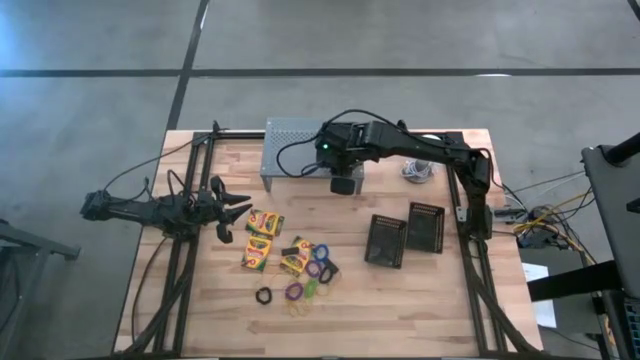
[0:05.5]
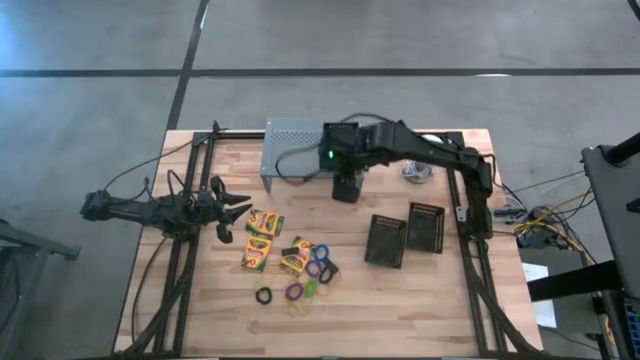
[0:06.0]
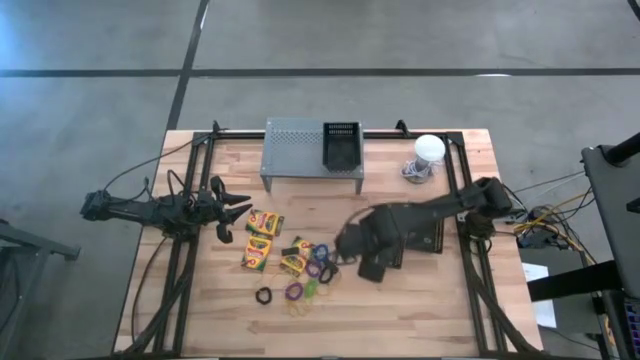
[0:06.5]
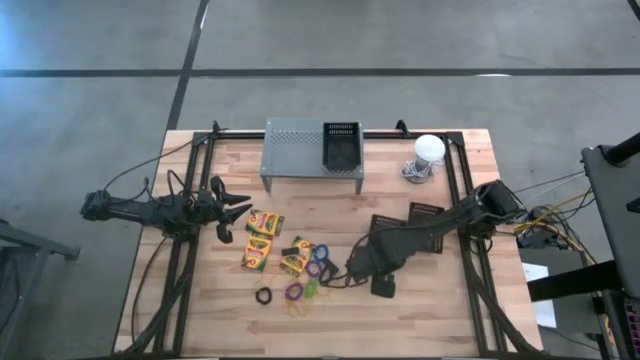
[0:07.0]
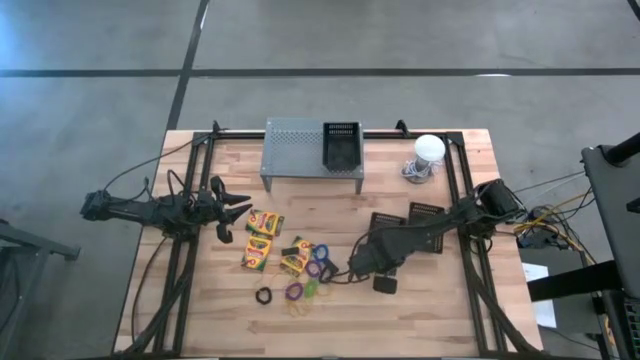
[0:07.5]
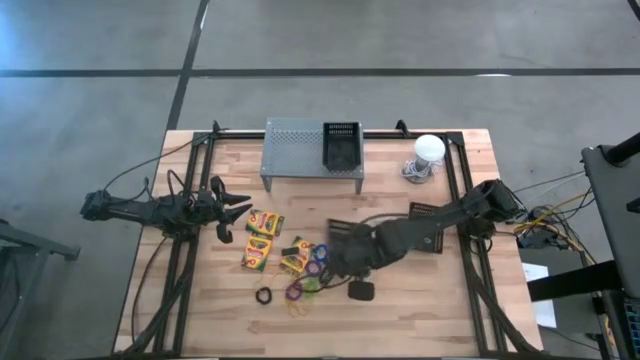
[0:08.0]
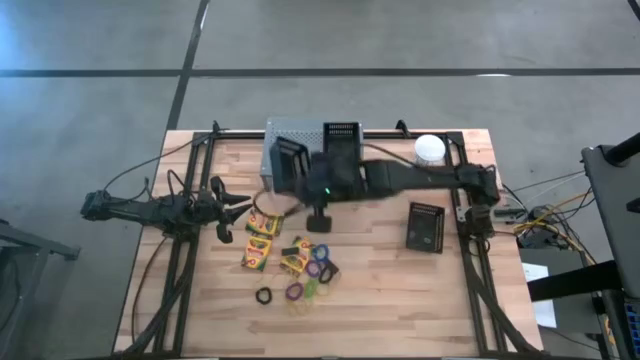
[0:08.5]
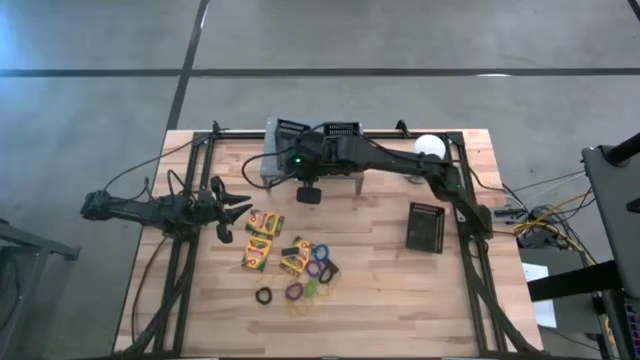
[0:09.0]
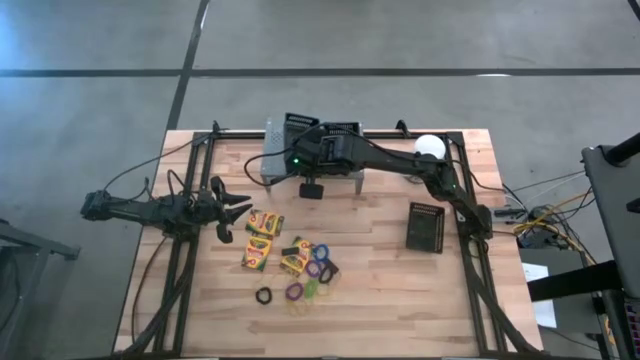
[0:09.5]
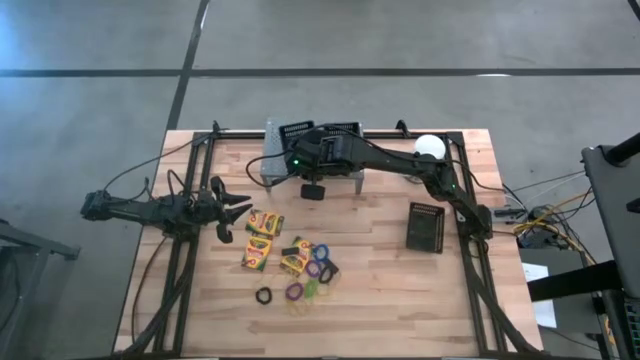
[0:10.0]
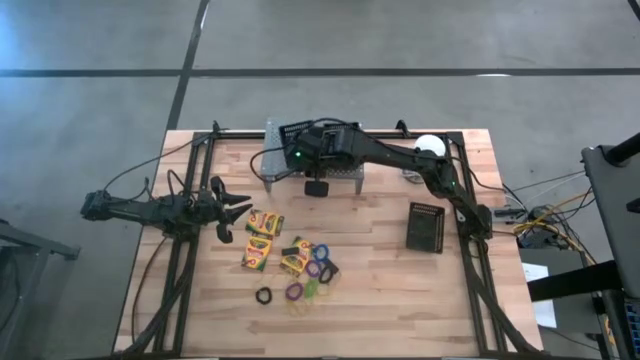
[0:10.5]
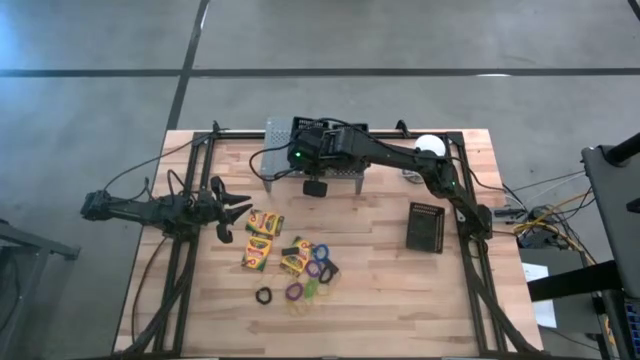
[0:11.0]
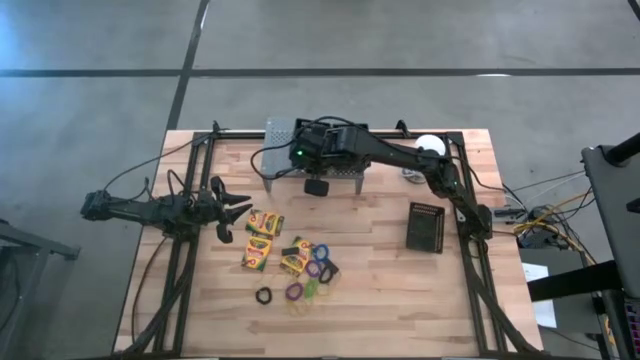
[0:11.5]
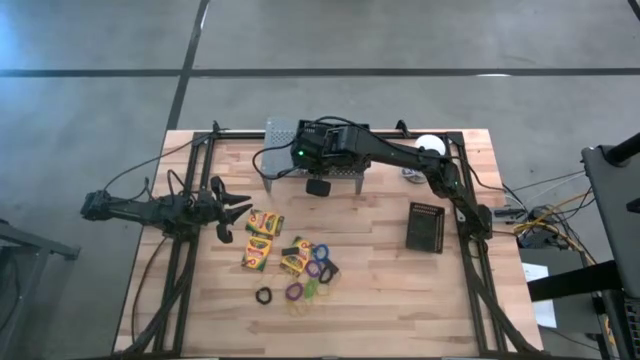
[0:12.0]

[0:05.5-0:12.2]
Task: Pick & Place Office Desk Supplies
Put the left black bin on the shelf

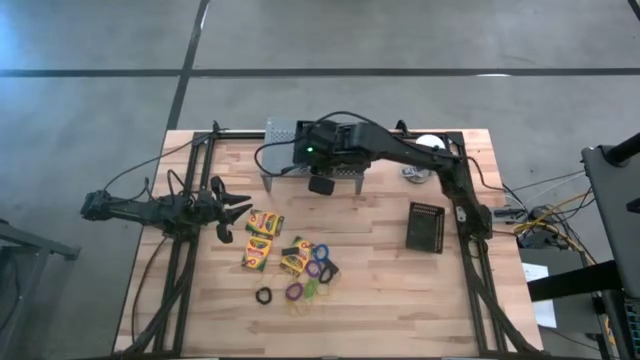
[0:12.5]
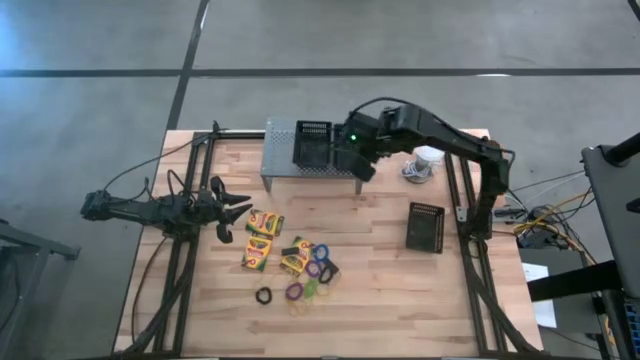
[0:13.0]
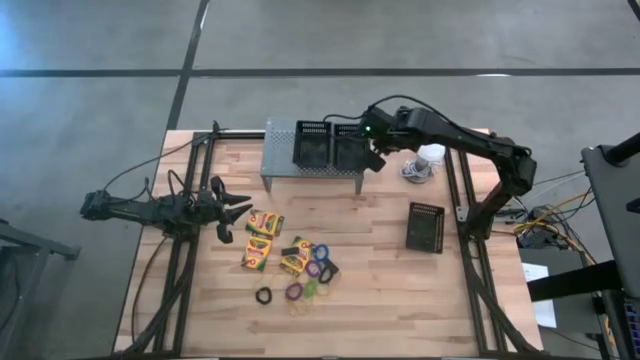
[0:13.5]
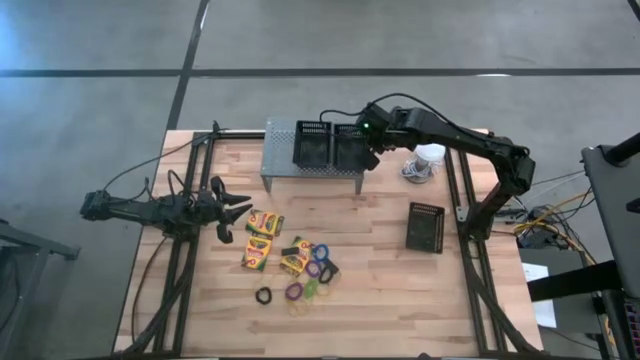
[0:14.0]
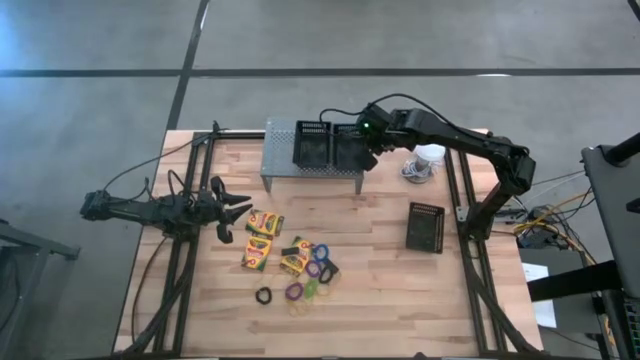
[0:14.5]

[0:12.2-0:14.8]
Adjust the right black bin on the shelf

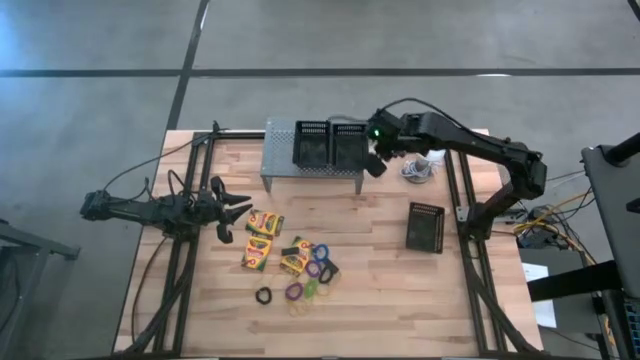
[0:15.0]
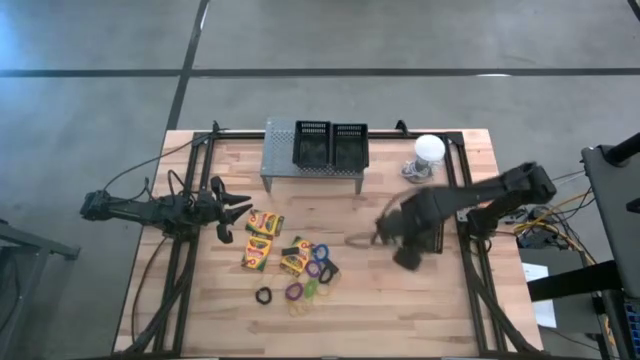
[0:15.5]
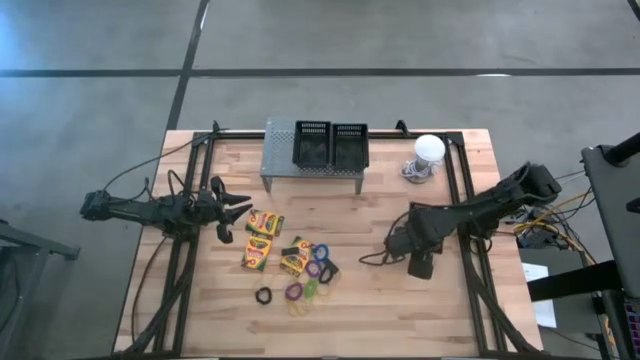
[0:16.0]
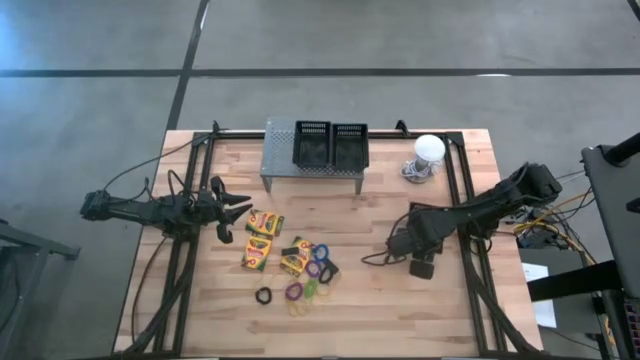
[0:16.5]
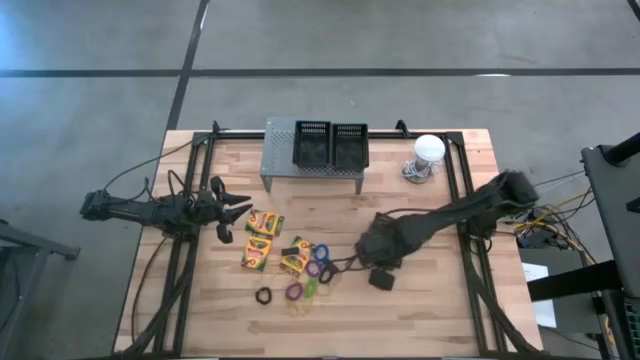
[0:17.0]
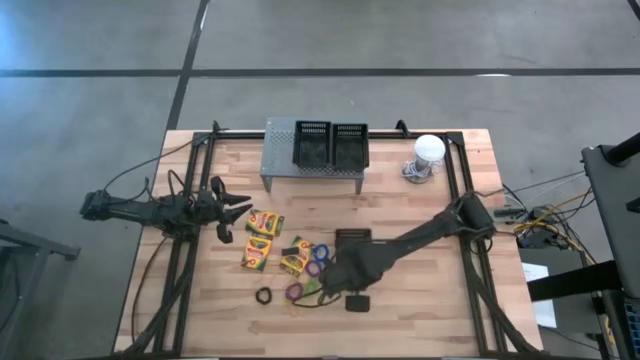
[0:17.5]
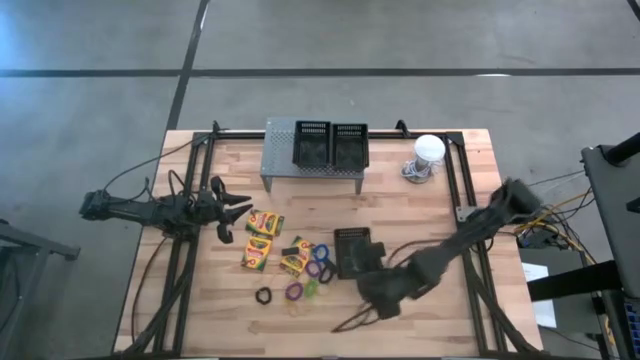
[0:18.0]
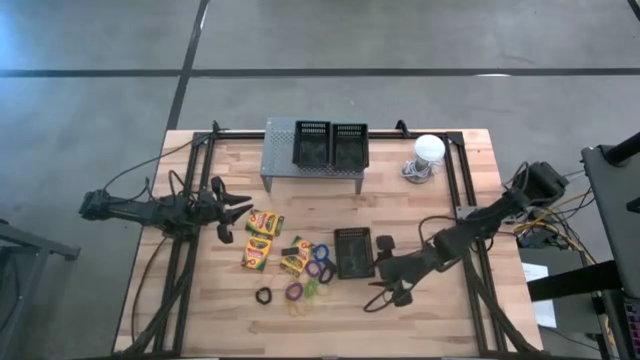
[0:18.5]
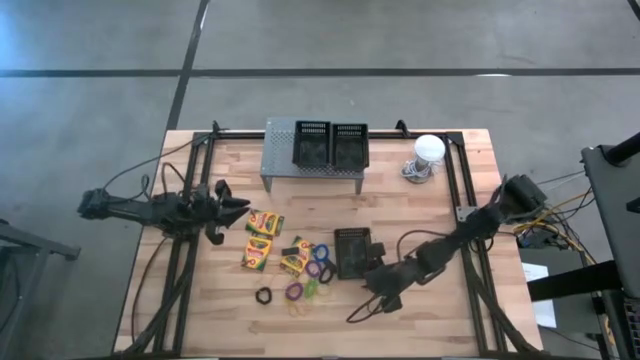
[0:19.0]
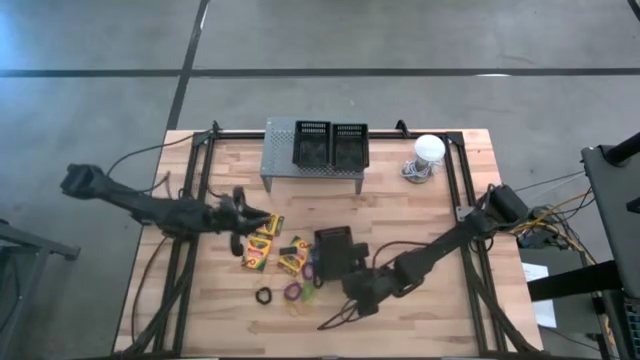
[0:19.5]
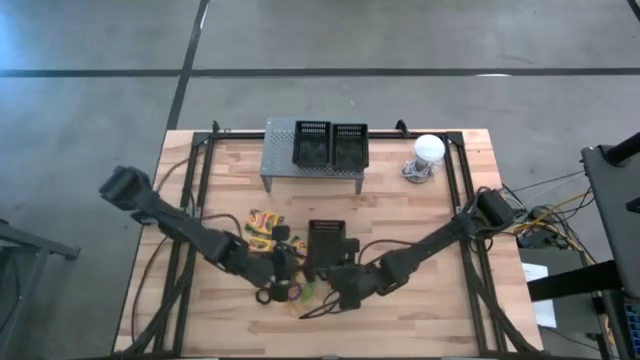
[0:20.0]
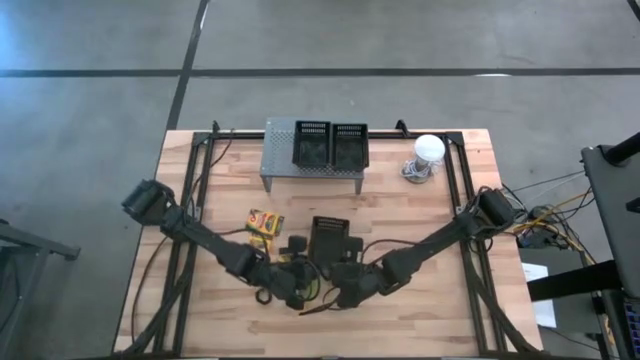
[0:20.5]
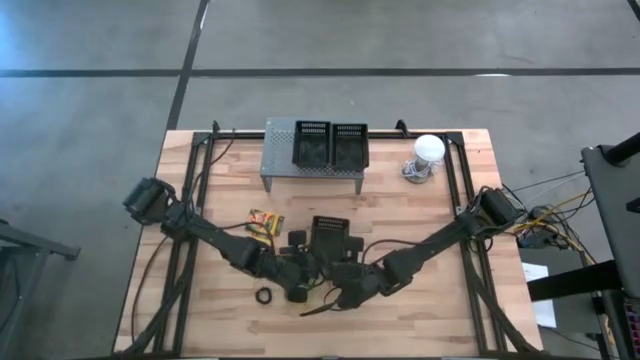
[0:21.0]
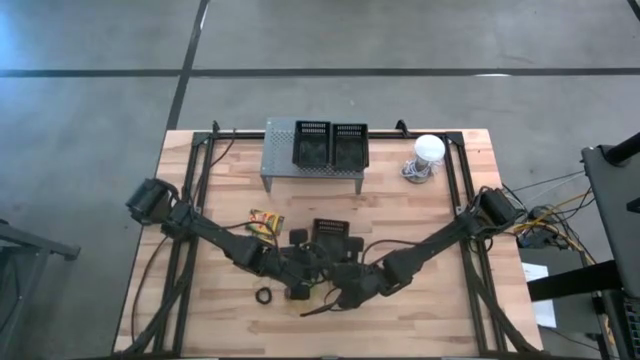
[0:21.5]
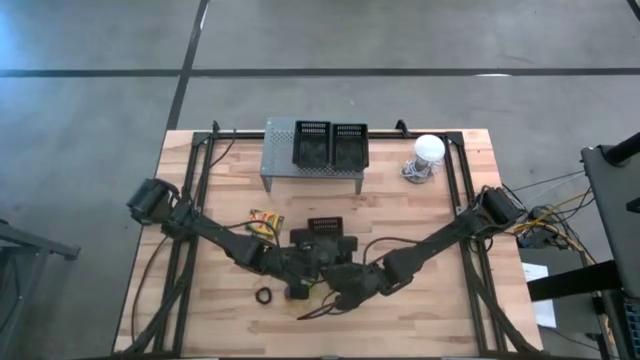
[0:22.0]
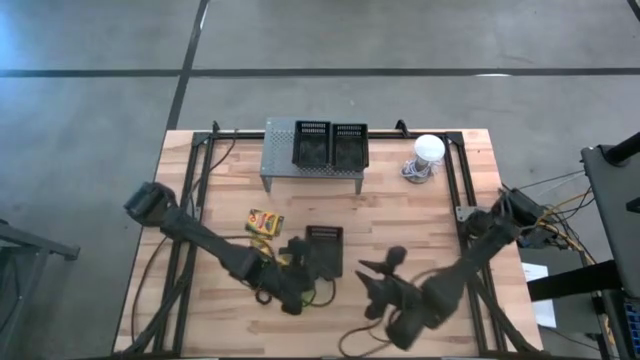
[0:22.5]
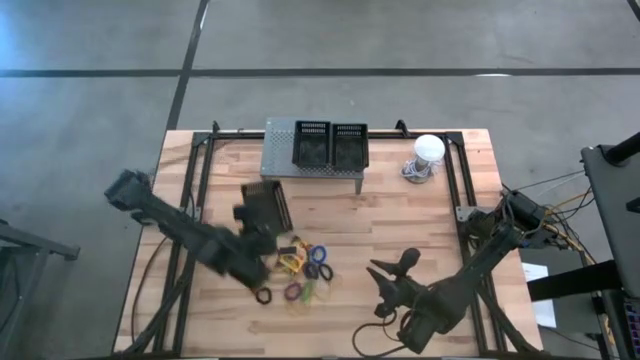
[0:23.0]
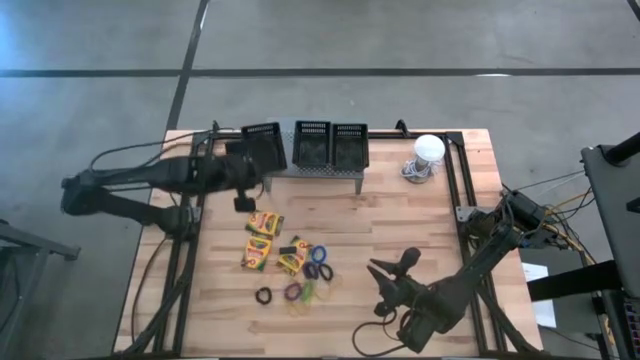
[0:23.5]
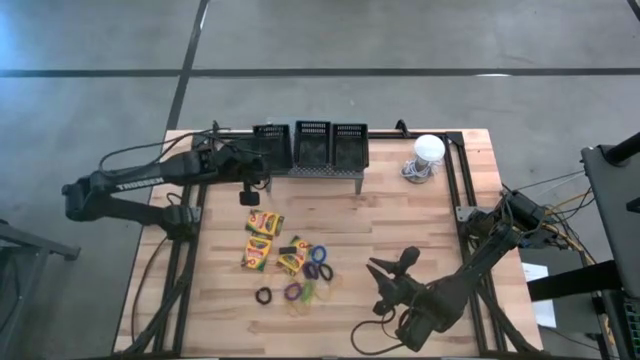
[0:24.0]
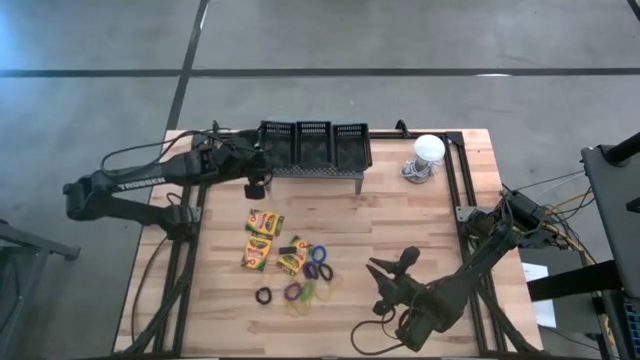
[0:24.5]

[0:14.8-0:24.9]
Put the black bin on the shelf

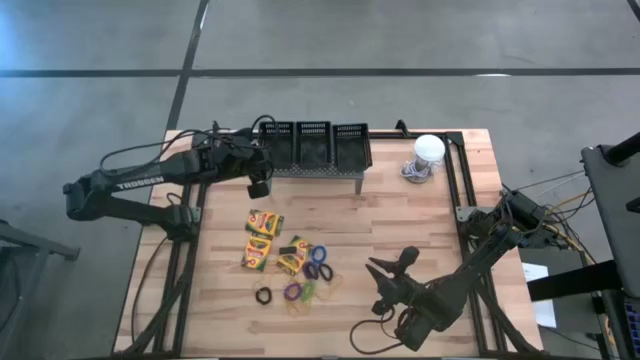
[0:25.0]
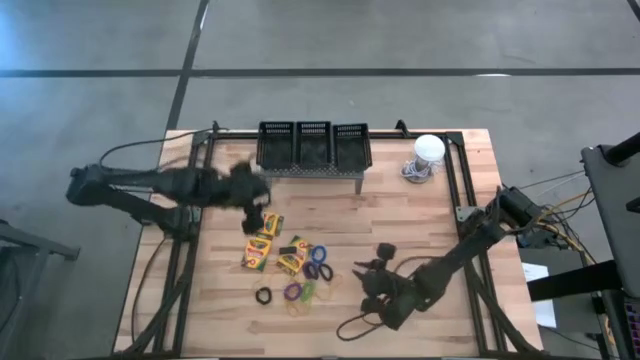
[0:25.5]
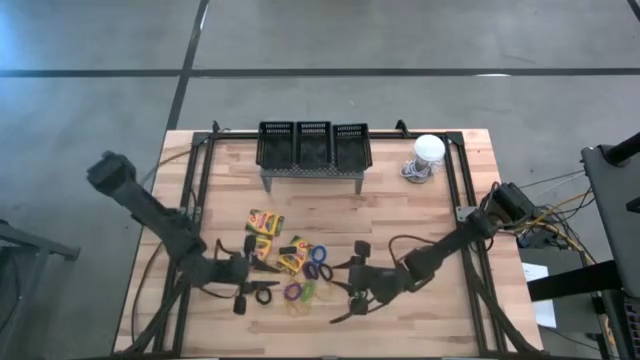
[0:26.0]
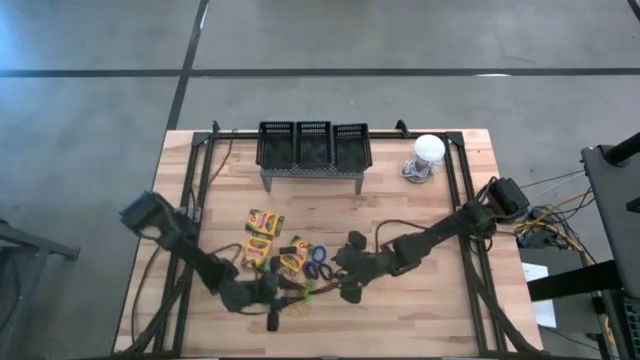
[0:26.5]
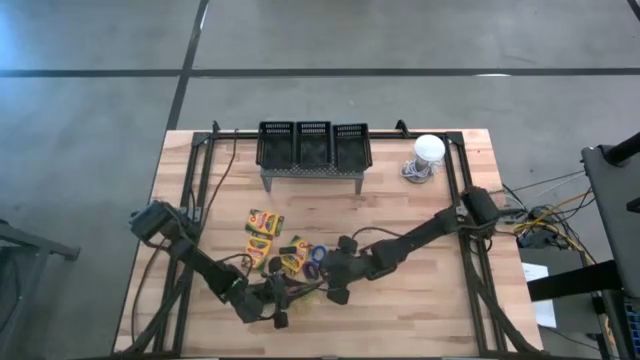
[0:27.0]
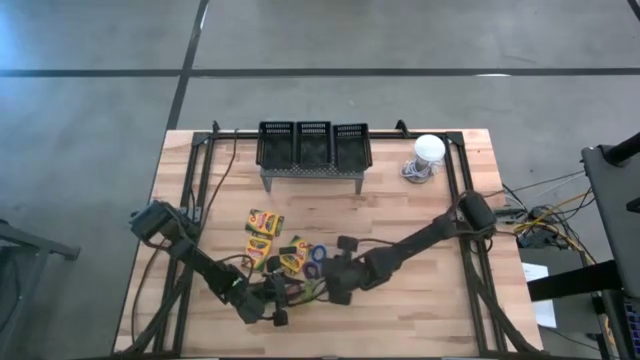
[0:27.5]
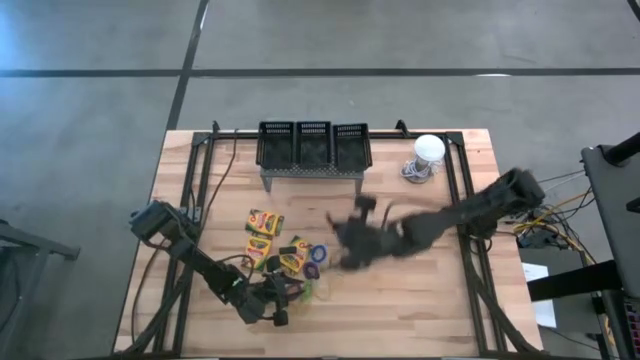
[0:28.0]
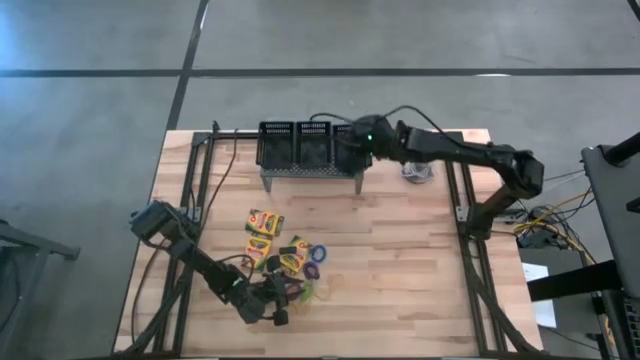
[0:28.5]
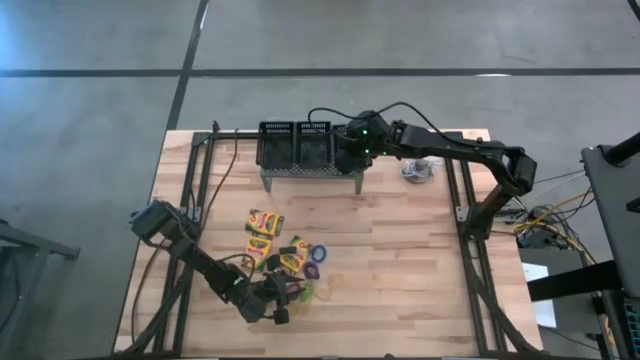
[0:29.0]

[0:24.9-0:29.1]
Put the black spring keychain into the right black bin on the shelf
